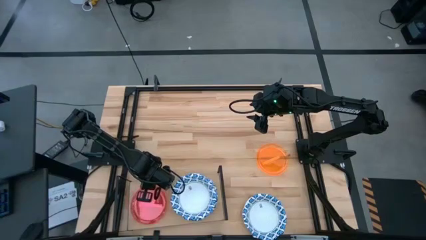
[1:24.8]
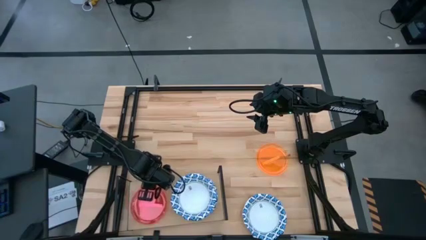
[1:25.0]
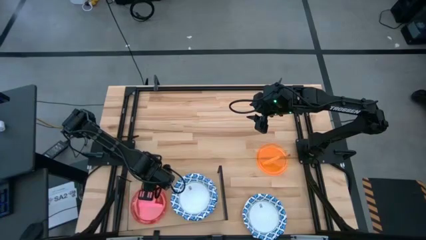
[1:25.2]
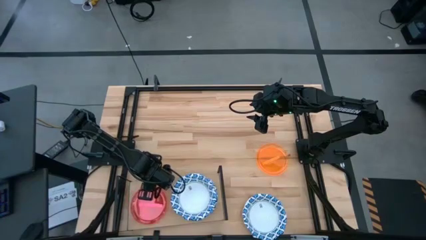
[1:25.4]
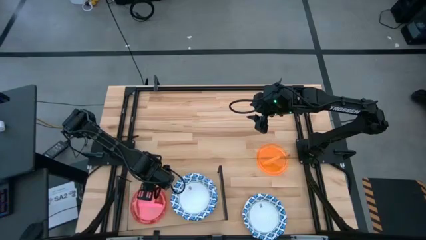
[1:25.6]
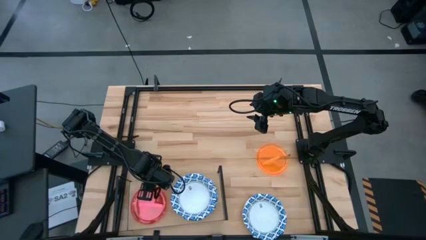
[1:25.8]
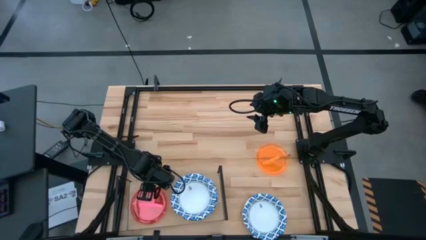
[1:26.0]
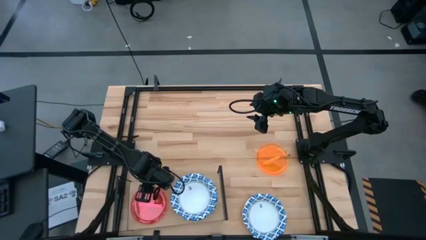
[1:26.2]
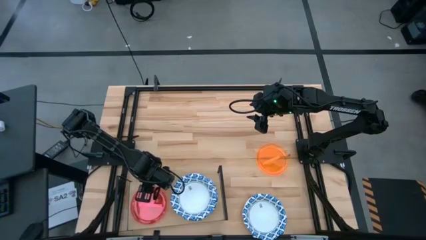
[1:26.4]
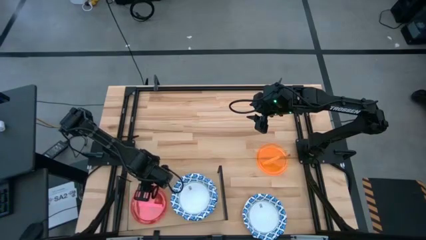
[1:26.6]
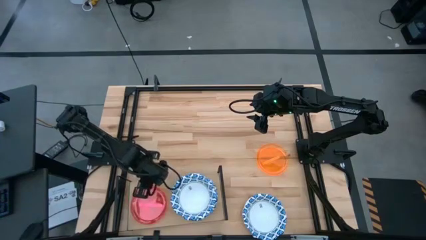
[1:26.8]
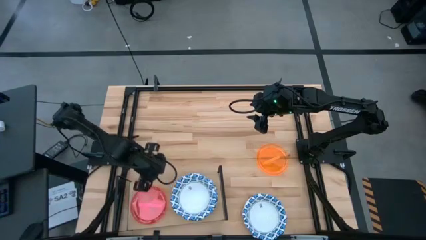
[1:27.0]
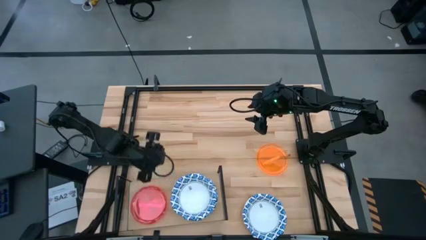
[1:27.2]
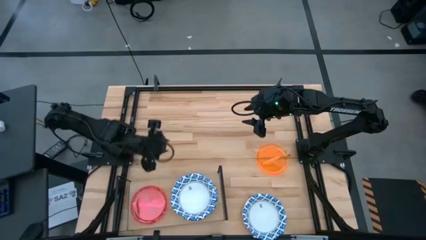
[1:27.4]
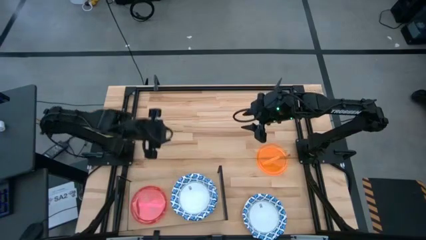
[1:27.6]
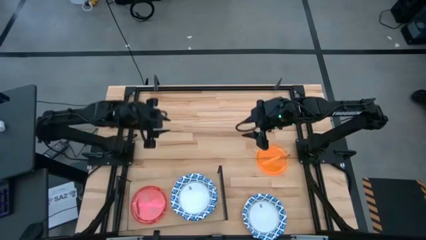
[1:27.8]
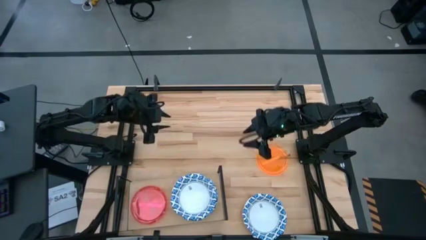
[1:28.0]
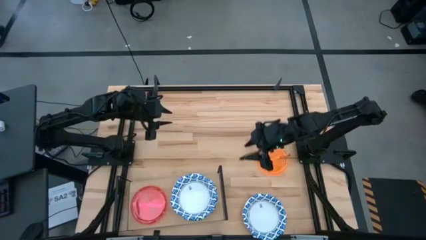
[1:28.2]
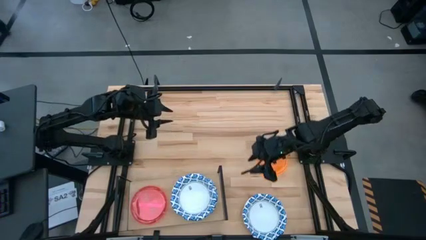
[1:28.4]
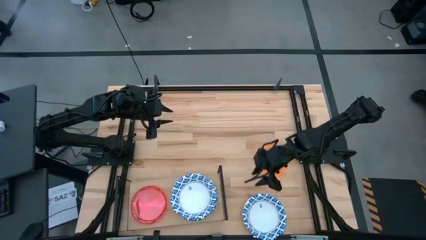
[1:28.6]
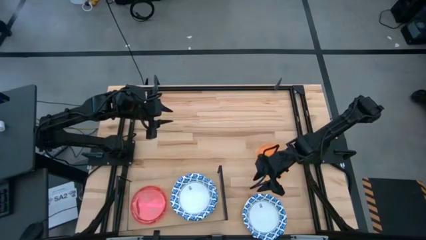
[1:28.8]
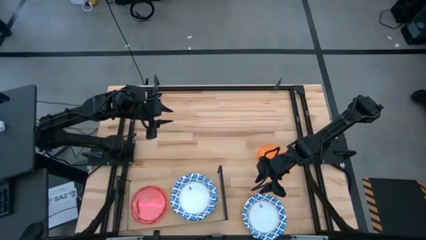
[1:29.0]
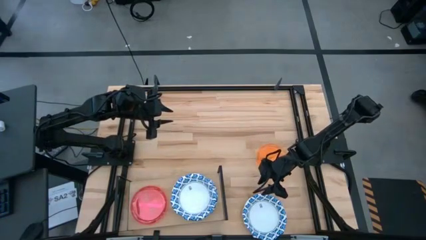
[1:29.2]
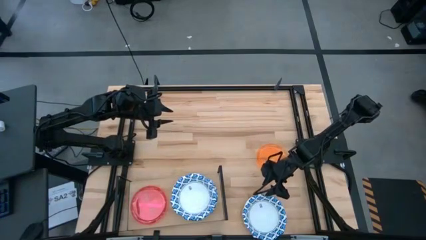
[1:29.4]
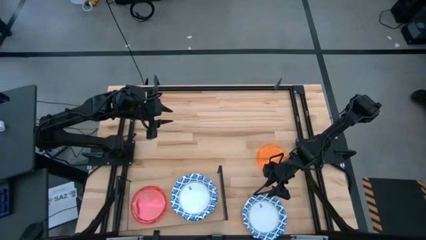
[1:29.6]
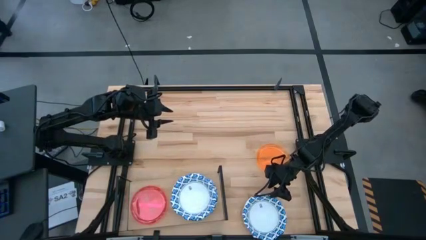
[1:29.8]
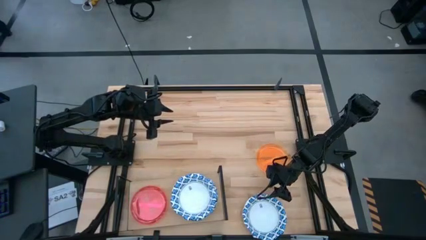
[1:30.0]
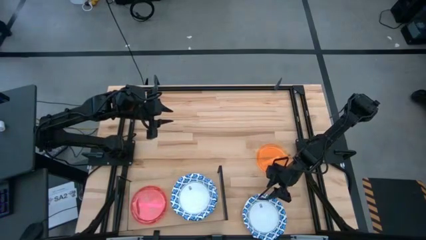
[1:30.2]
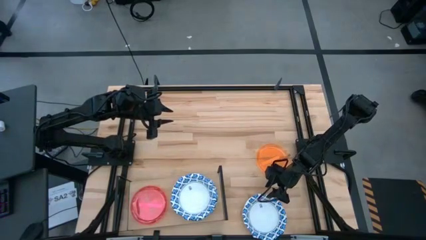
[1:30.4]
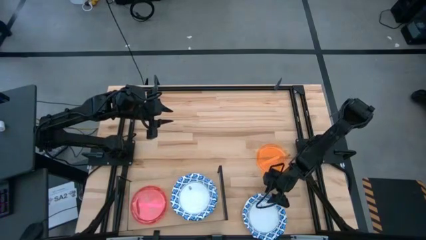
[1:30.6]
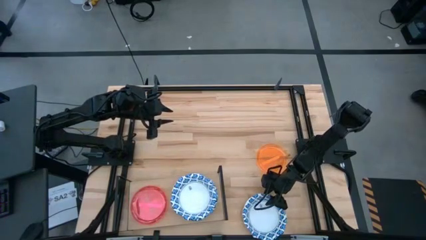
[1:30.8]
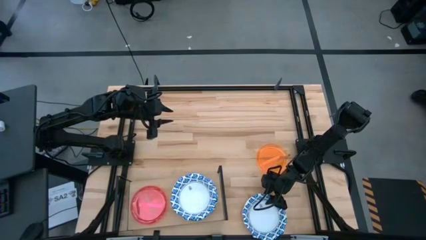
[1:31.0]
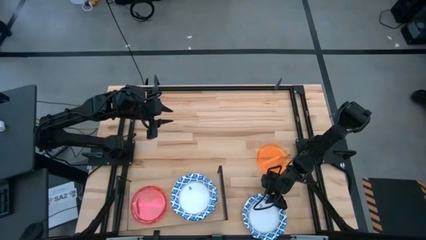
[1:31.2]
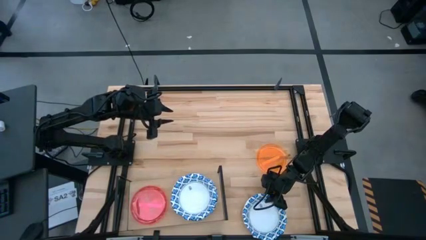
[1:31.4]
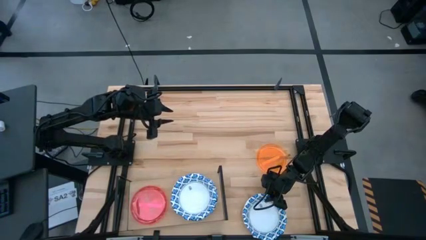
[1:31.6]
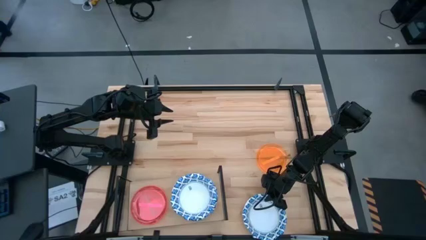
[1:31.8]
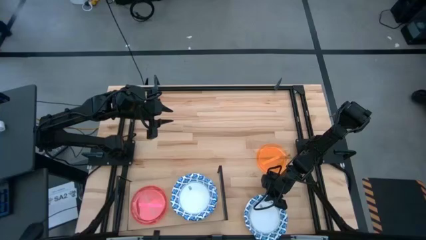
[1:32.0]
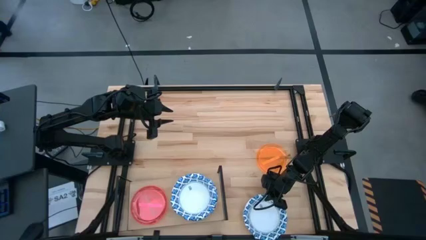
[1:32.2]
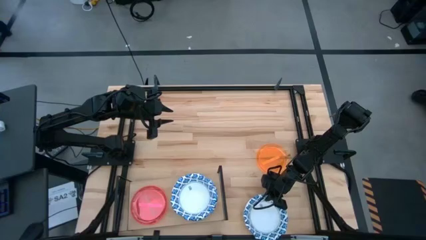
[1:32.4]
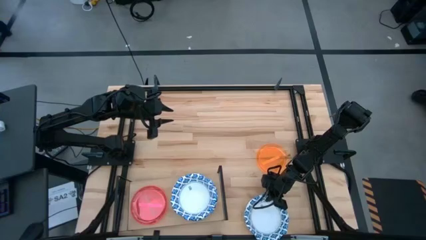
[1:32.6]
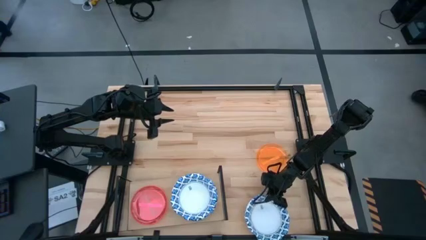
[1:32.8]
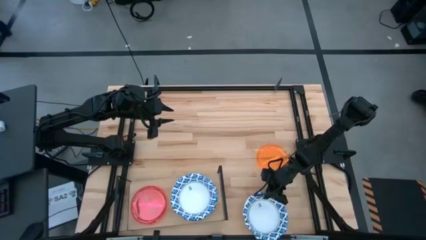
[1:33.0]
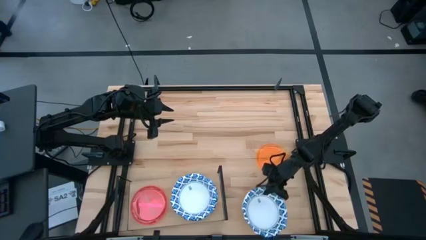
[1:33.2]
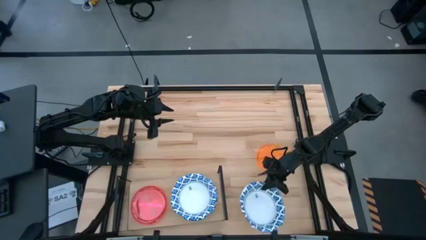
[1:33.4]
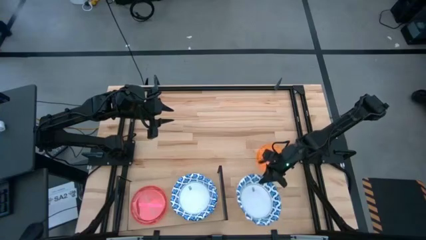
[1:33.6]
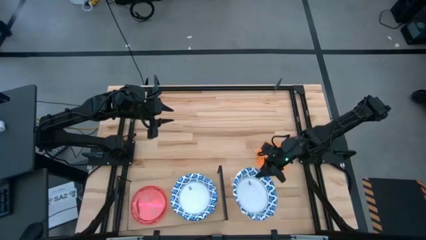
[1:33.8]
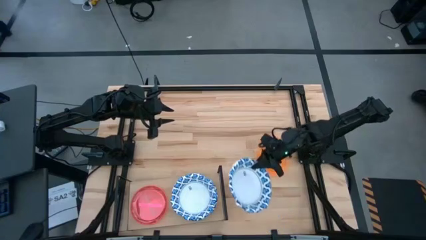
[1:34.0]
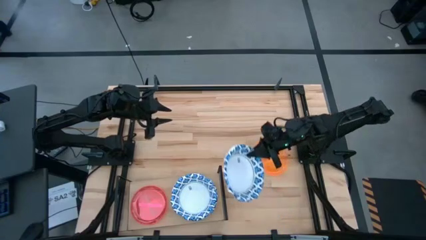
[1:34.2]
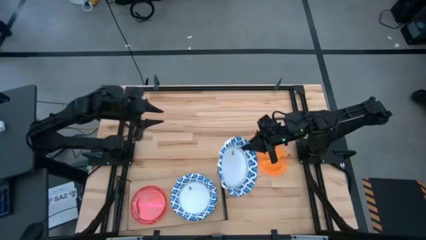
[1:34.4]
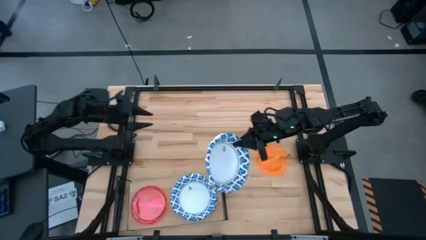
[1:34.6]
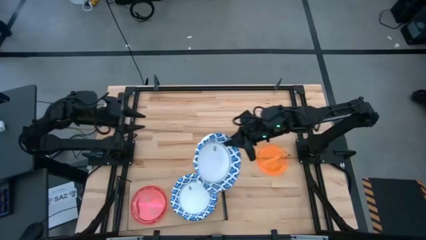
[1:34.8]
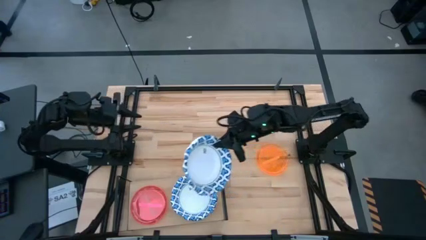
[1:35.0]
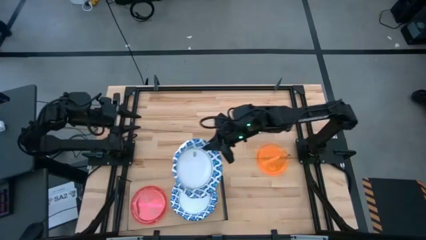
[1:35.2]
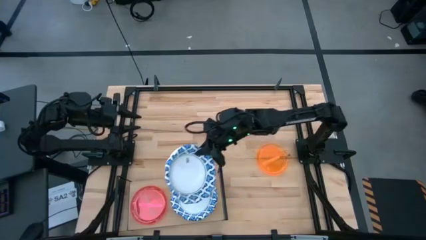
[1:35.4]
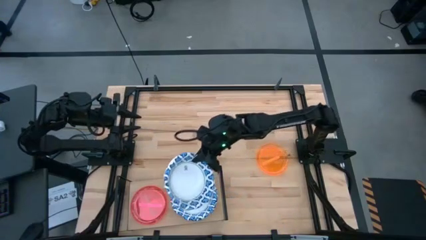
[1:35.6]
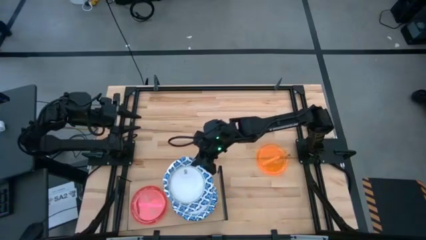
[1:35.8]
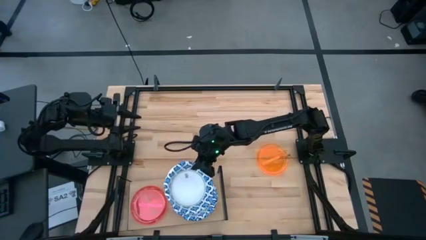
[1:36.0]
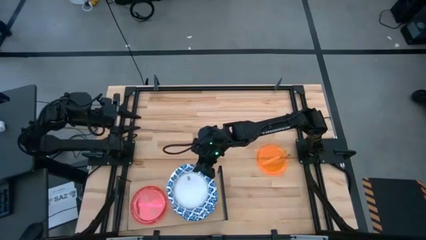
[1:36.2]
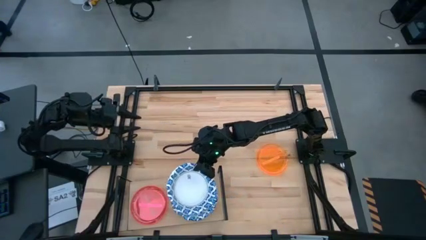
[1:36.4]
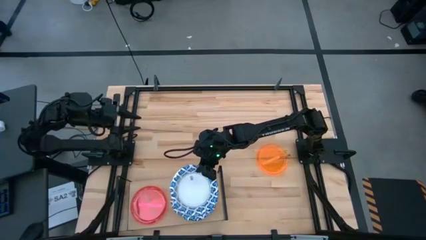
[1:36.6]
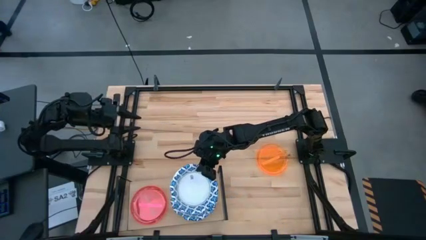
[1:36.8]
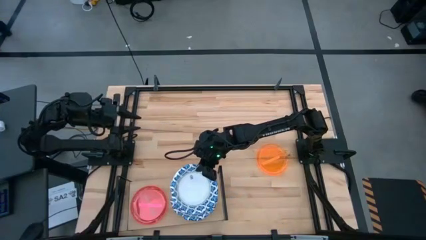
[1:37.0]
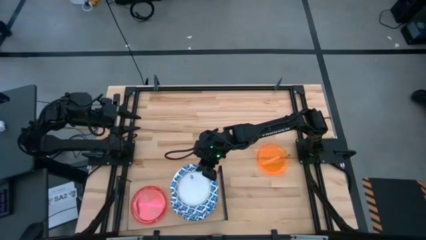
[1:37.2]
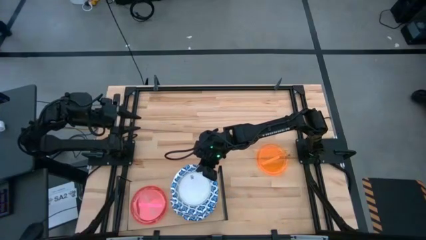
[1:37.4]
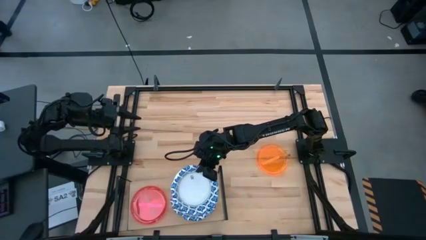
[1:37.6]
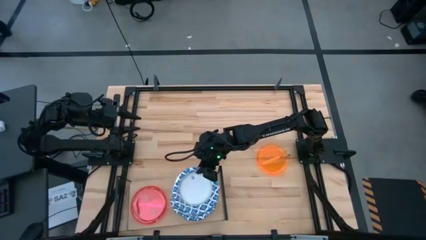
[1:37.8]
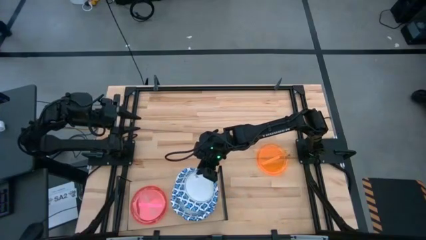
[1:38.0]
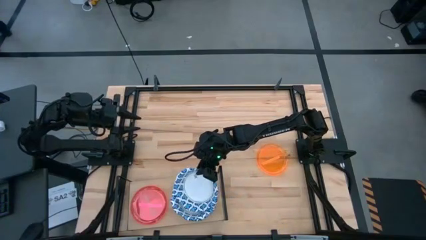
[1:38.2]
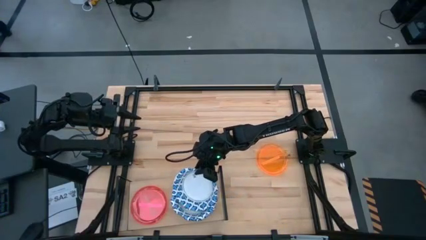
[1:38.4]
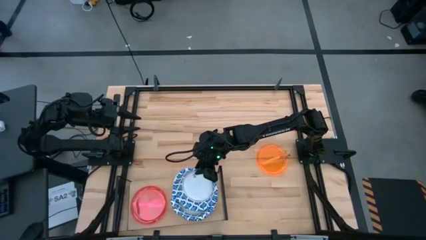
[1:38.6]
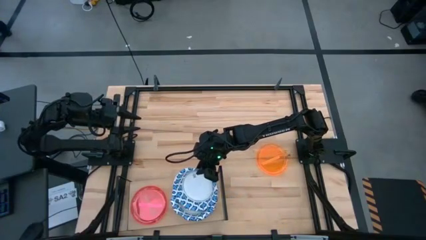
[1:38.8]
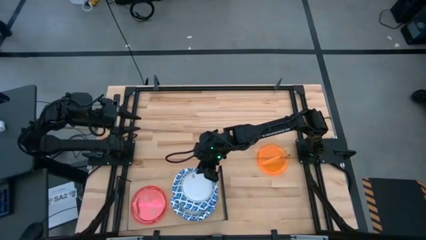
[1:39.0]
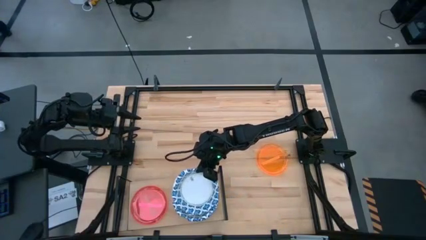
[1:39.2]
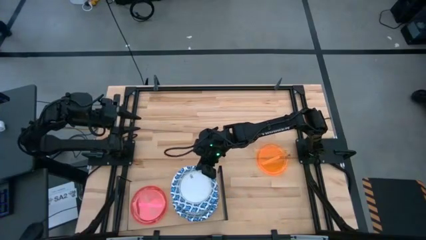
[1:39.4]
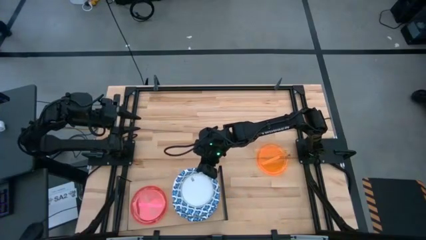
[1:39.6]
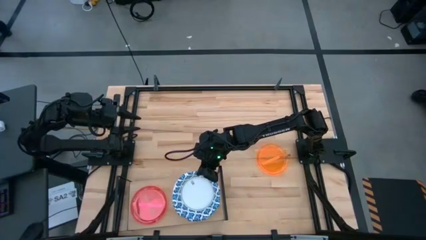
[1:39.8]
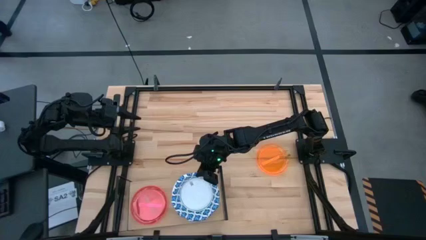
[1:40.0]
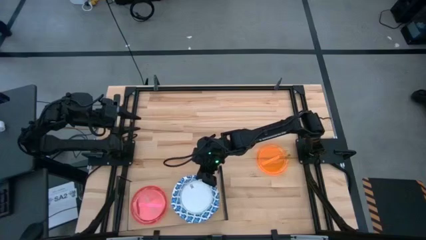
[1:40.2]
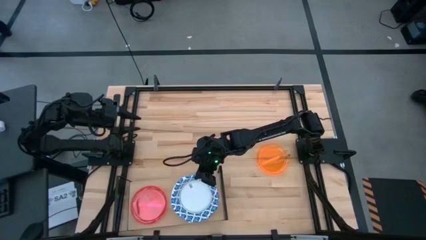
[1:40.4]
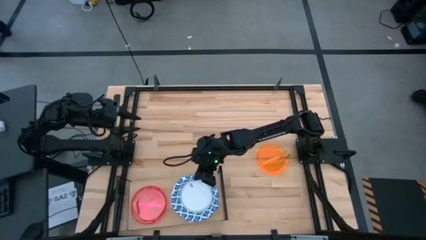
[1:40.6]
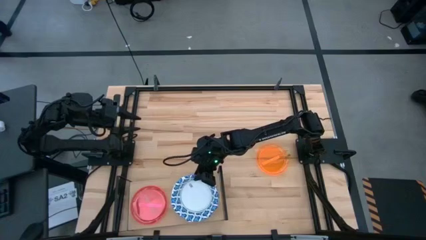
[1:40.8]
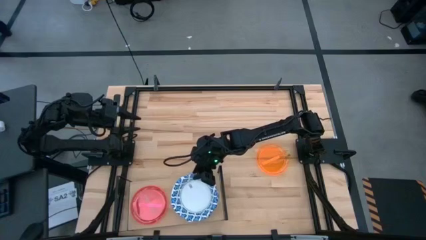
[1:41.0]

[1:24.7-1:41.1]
Task: Place and stack plates onto a shelf
Stack the blue bowl on top of the other blue bowl on the shelf
